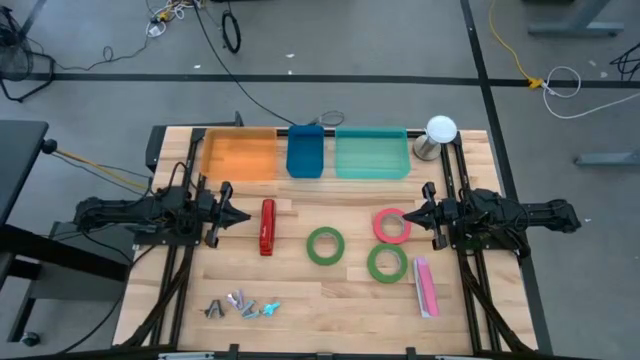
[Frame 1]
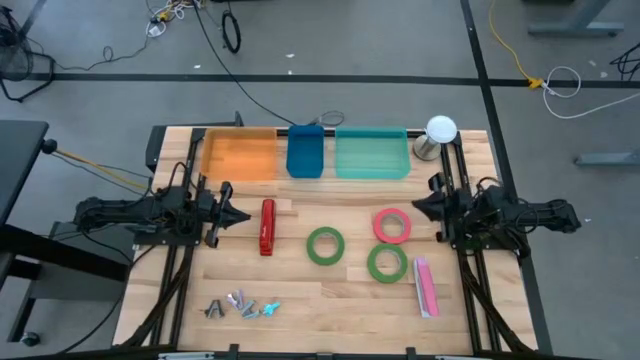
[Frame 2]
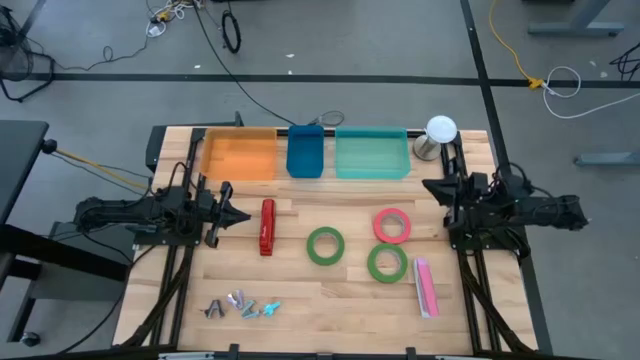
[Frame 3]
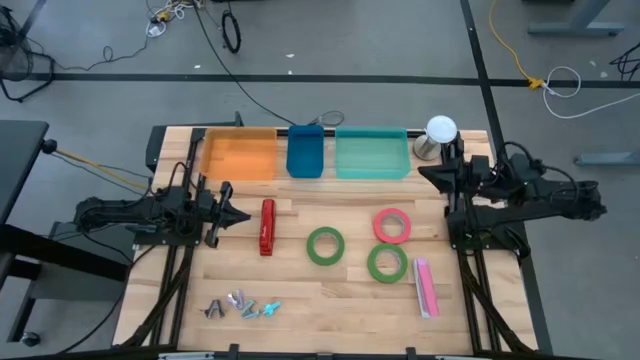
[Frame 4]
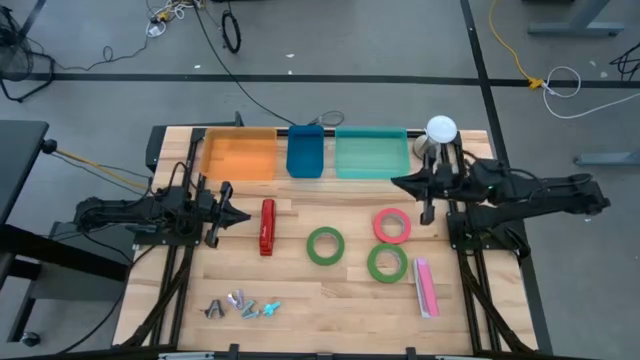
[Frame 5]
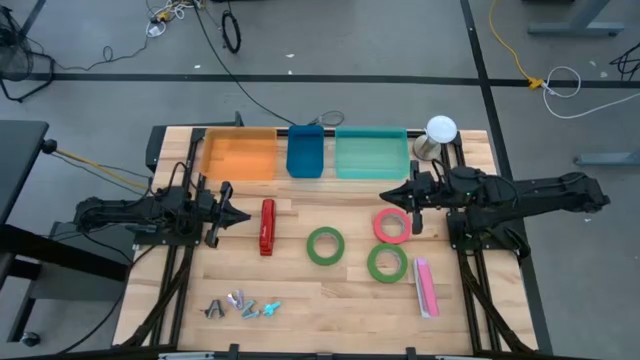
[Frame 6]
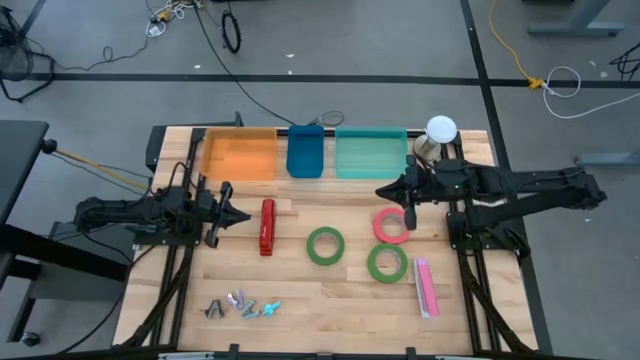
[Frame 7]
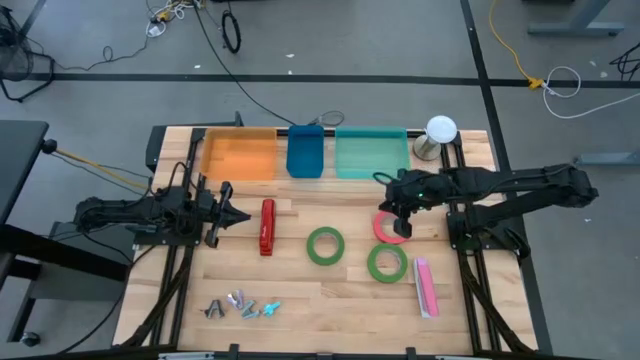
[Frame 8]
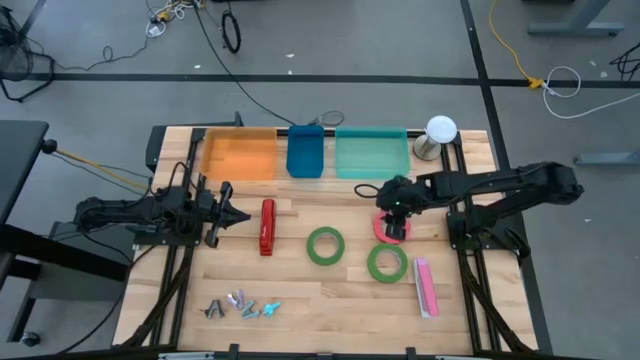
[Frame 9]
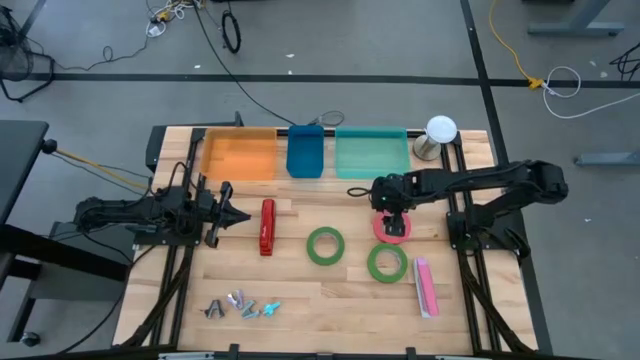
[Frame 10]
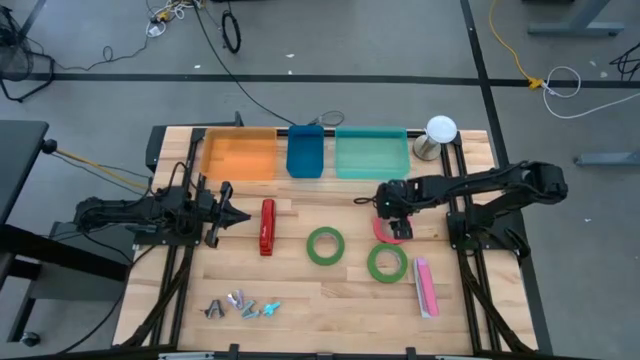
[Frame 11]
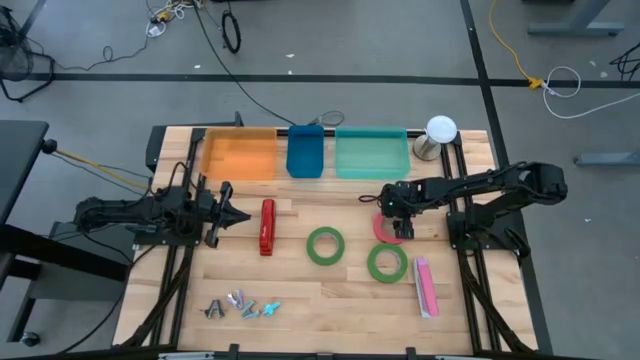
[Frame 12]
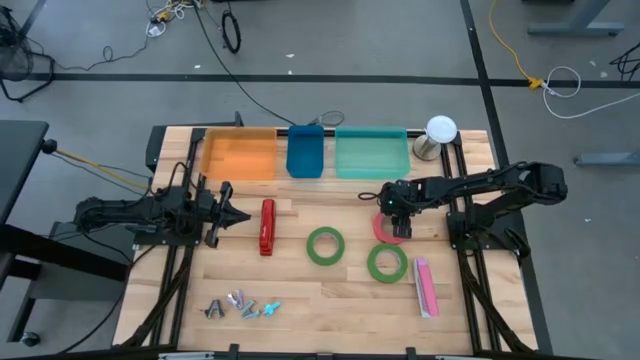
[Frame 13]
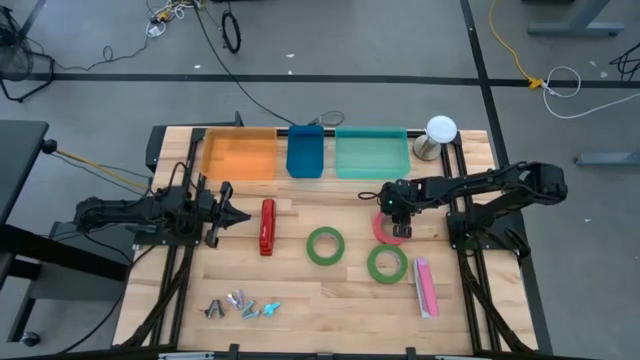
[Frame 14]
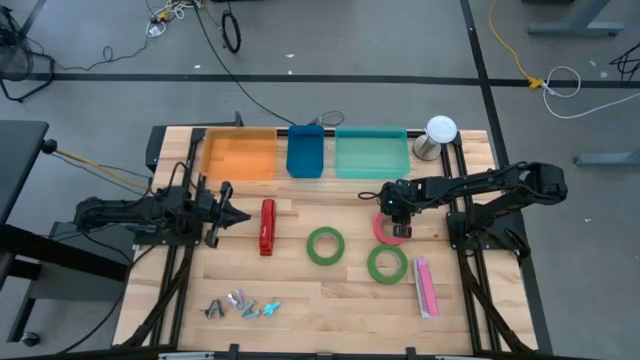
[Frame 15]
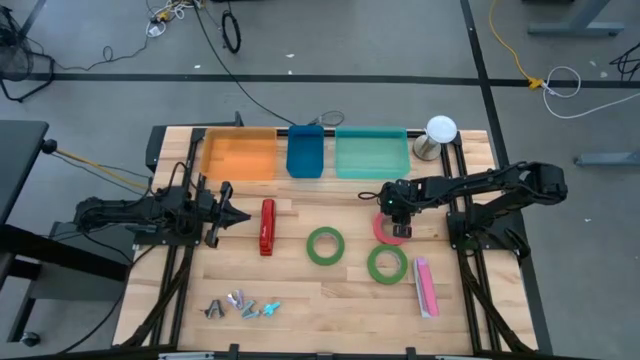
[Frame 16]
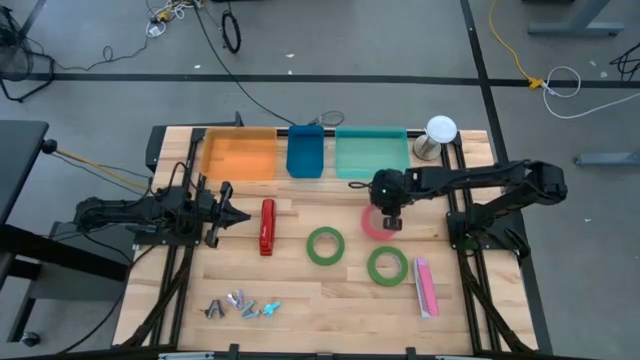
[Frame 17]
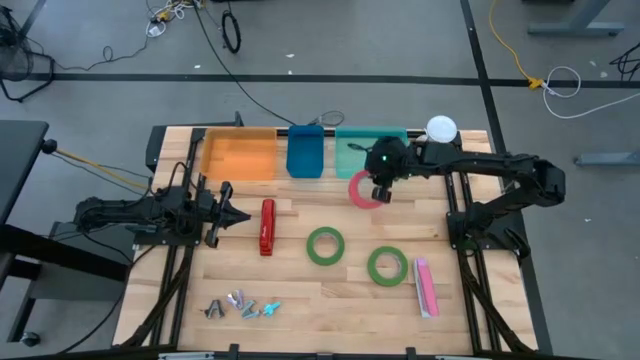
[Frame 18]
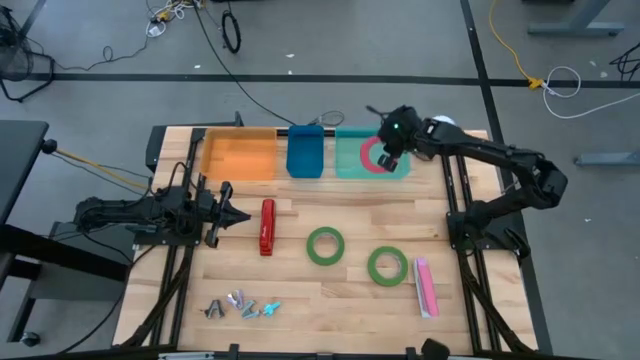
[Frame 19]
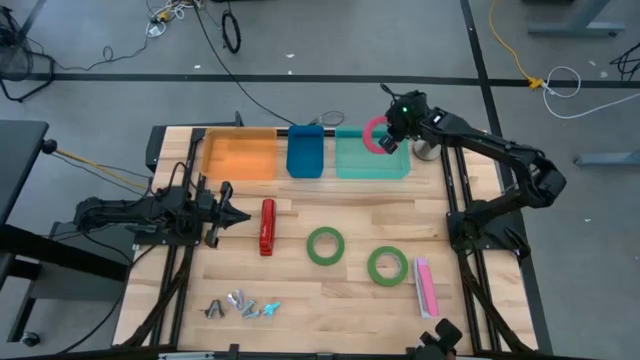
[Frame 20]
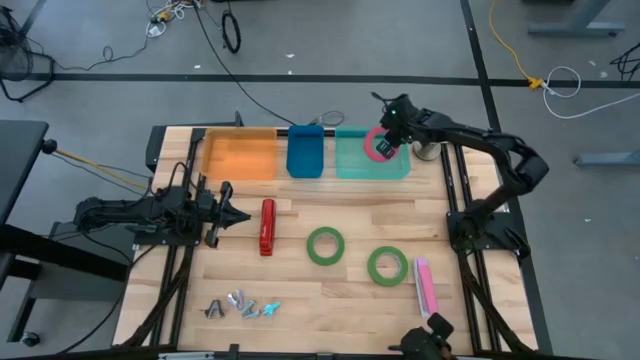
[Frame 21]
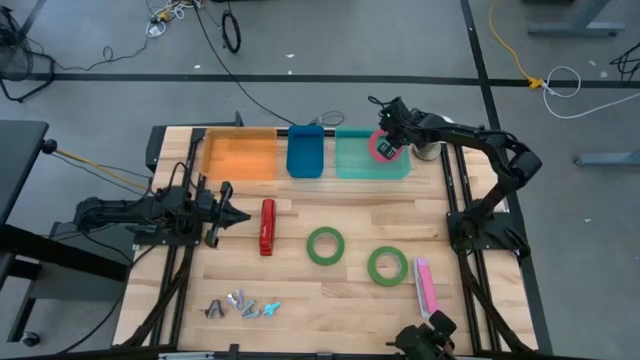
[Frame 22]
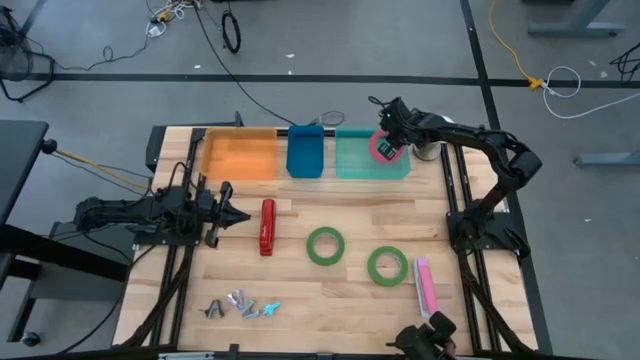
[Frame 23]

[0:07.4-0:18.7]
Task: Pick and place Stapler, Stapler remover, tape
Put the pink tape into the light green bin

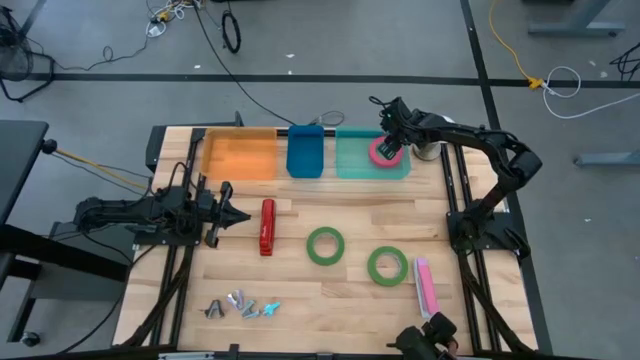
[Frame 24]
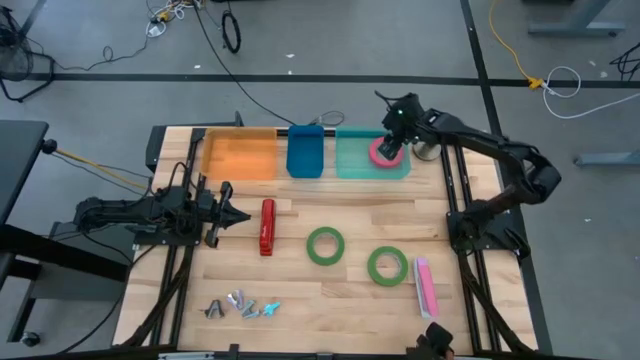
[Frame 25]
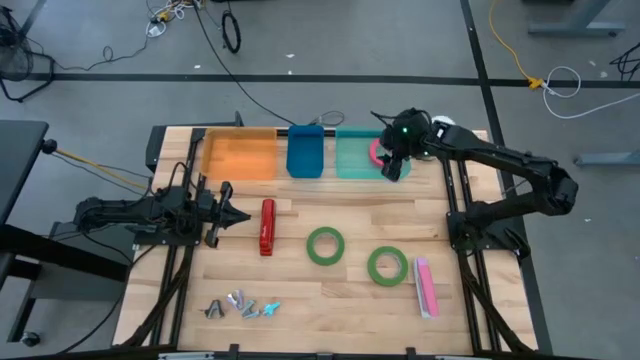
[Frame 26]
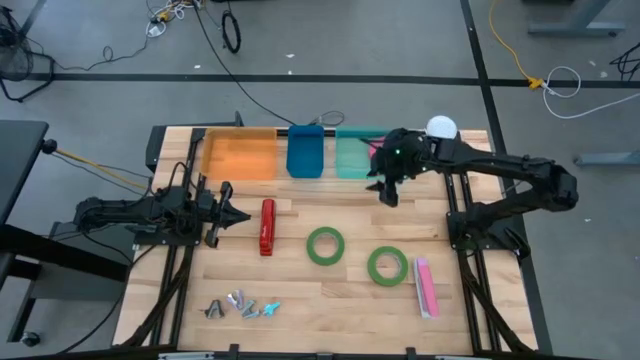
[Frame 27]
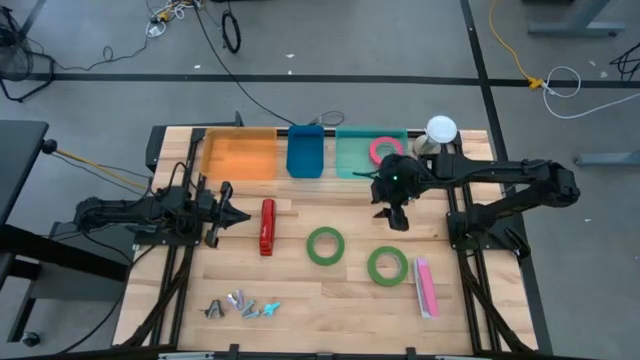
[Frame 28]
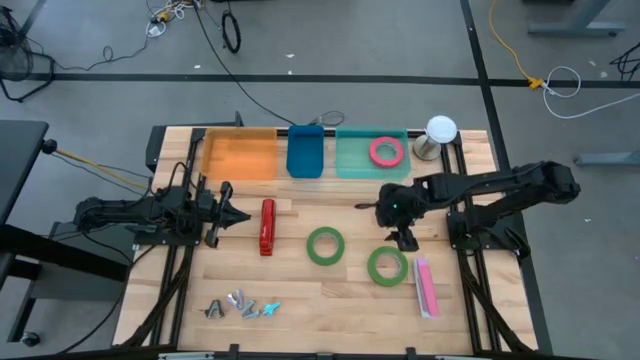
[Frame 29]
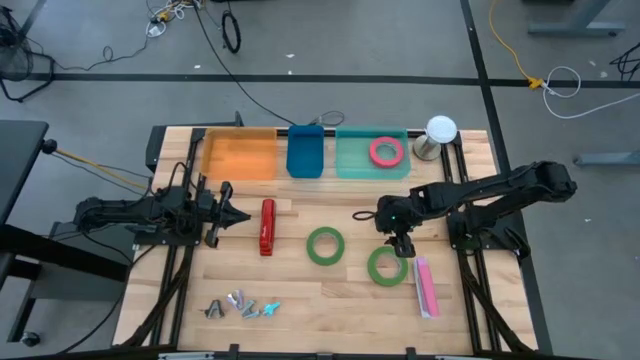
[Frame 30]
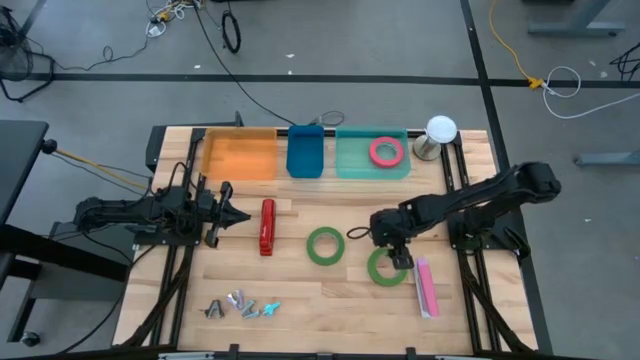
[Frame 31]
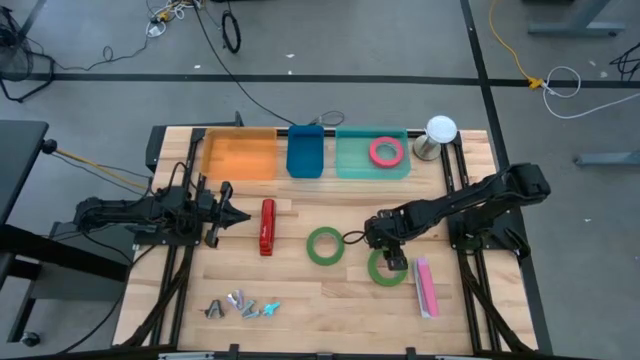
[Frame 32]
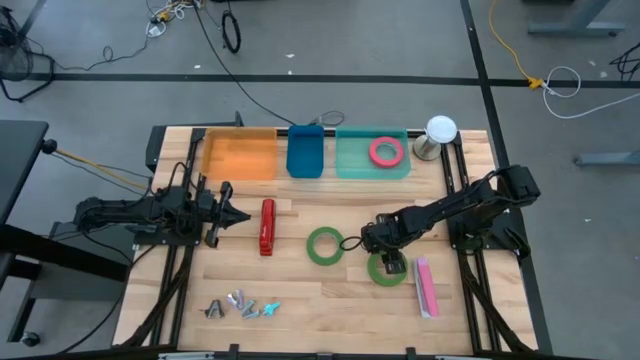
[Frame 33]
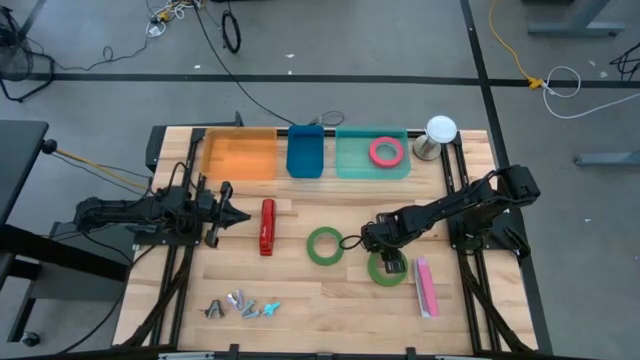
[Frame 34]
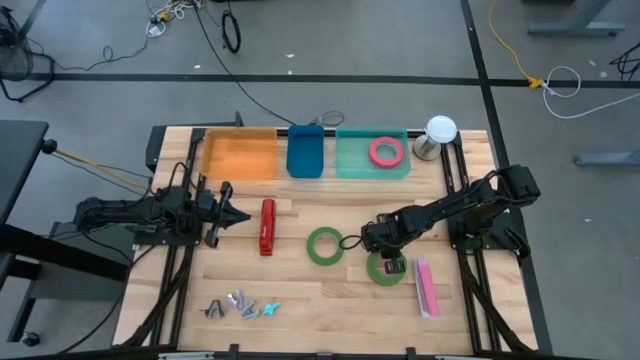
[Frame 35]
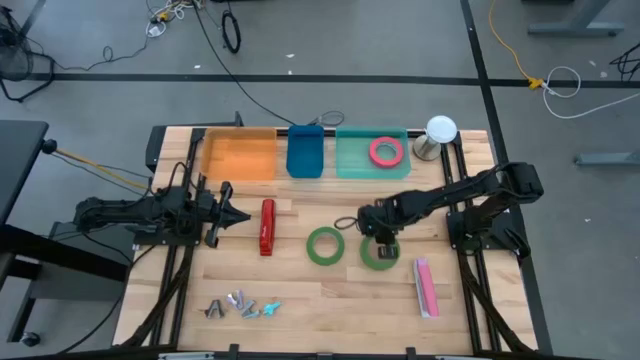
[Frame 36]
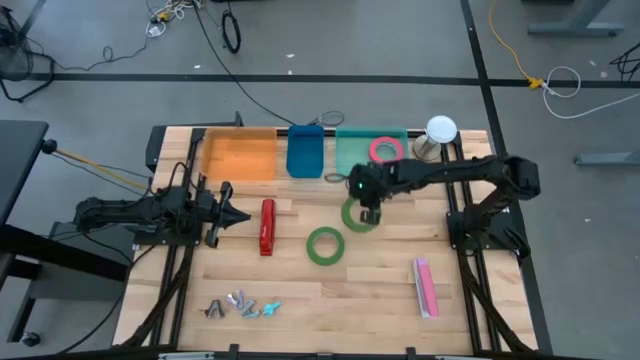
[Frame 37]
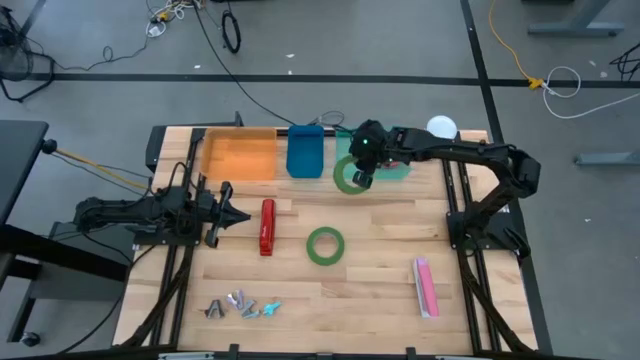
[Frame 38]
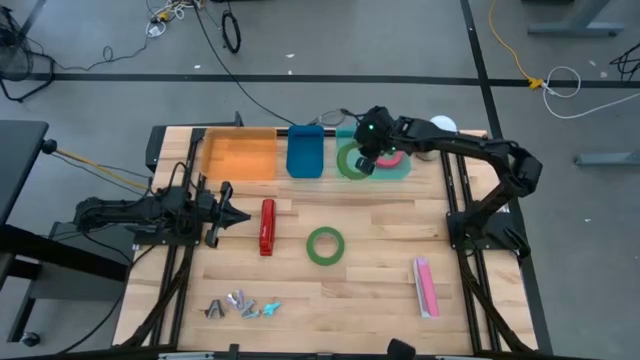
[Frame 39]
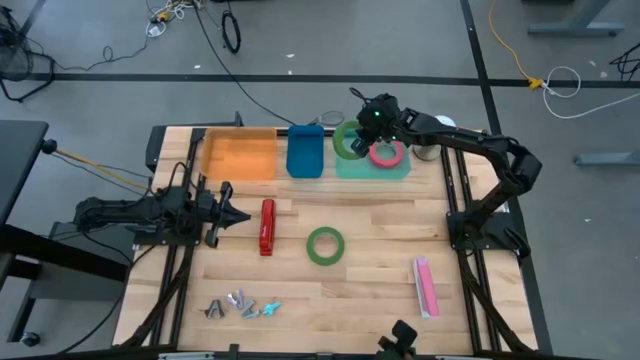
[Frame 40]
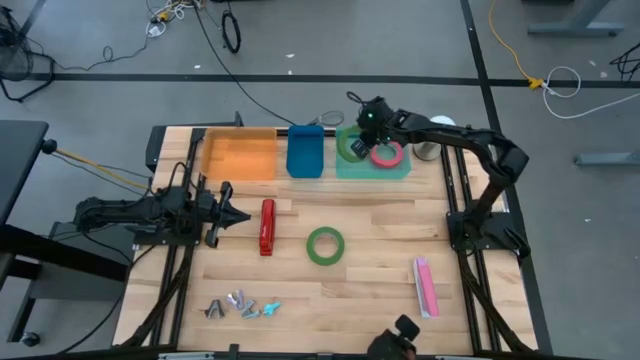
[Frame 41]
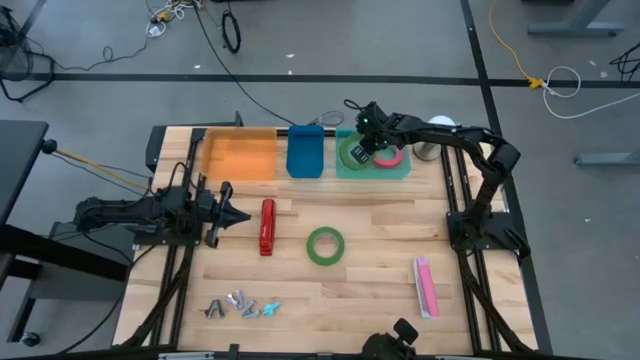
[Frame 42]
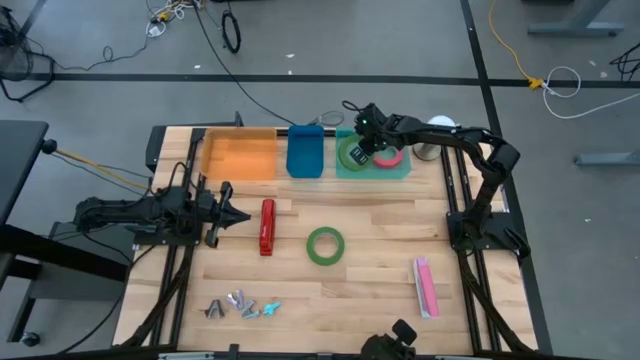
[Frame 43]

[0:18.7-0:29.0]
Put the right green tape into the light green bin
